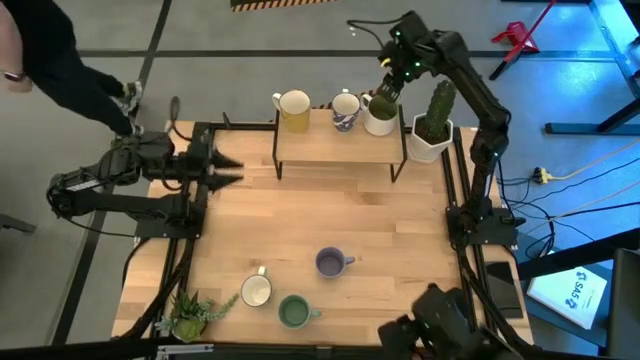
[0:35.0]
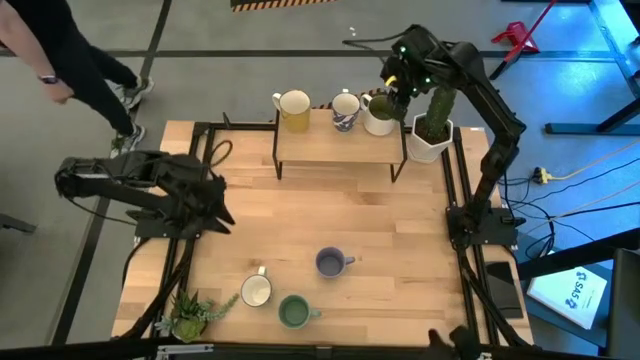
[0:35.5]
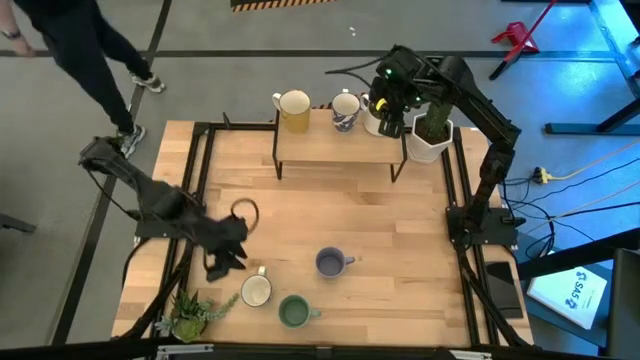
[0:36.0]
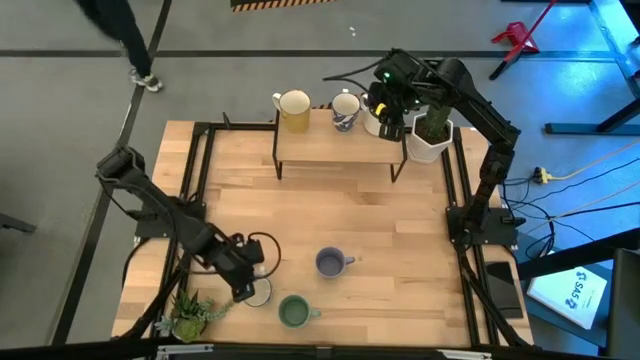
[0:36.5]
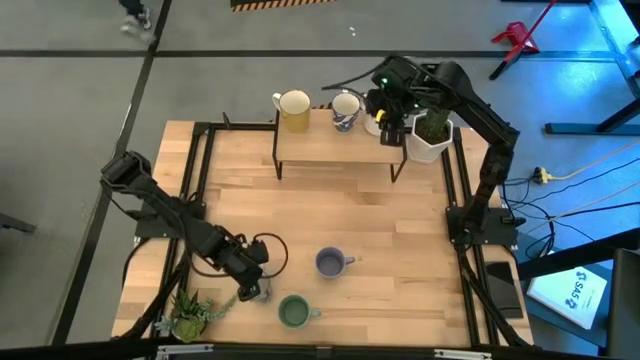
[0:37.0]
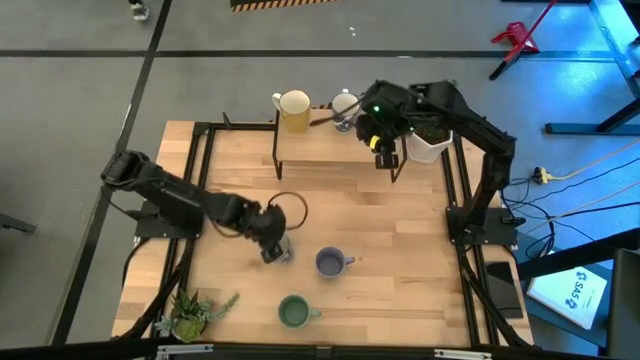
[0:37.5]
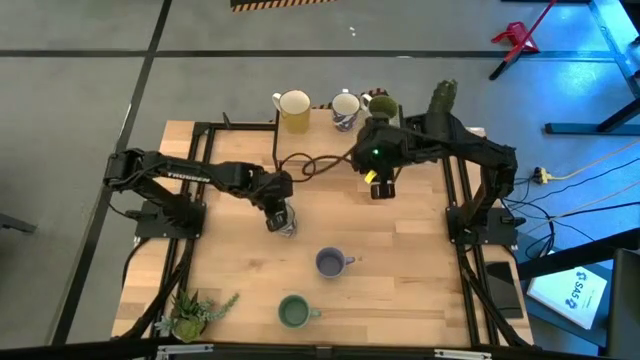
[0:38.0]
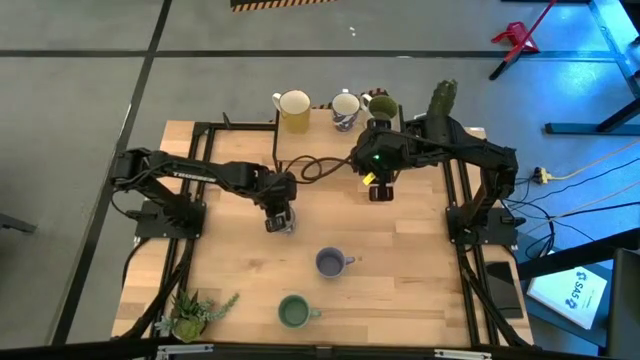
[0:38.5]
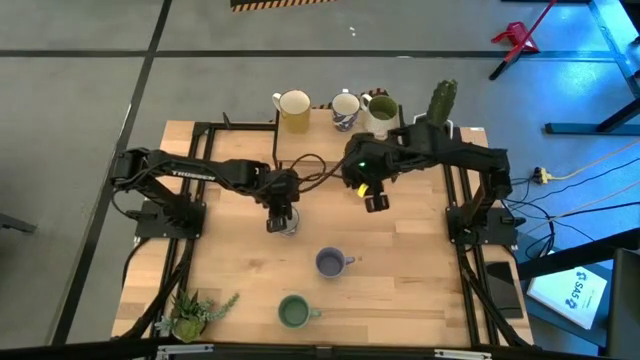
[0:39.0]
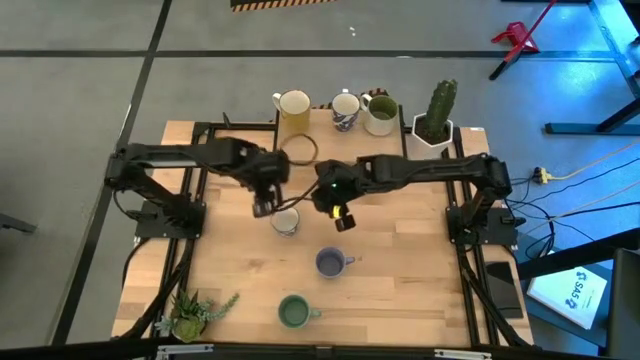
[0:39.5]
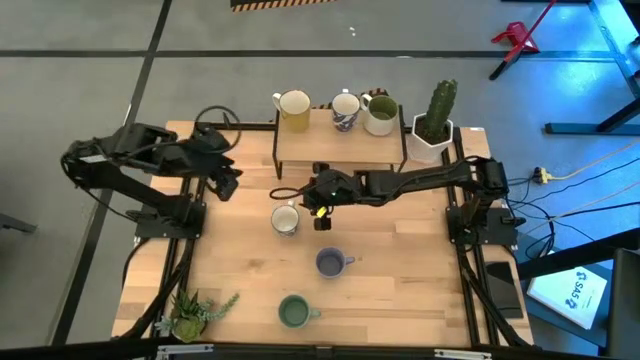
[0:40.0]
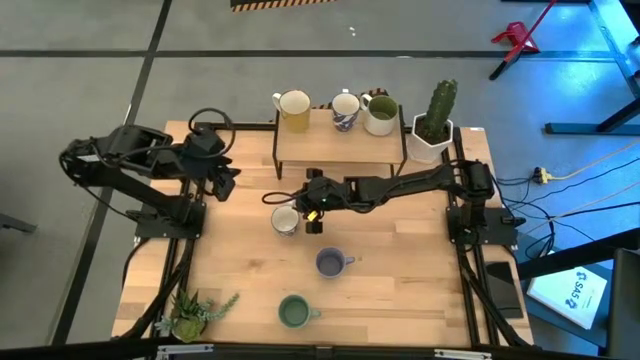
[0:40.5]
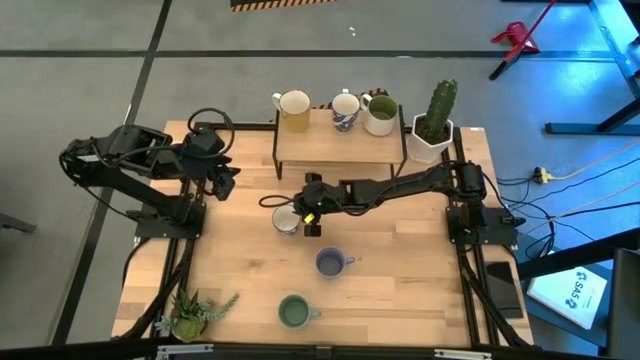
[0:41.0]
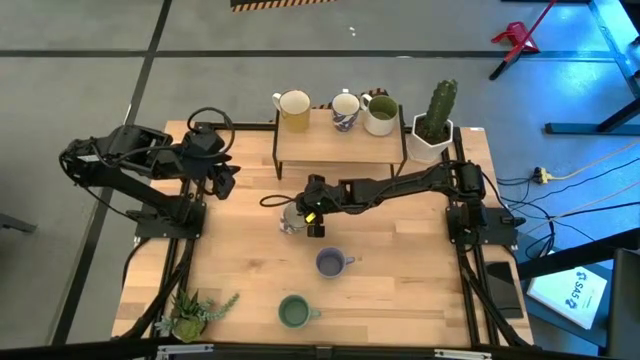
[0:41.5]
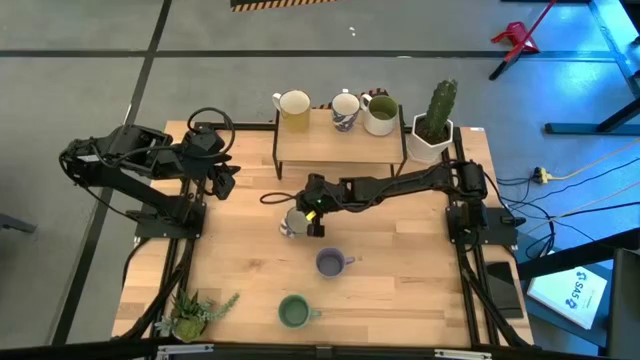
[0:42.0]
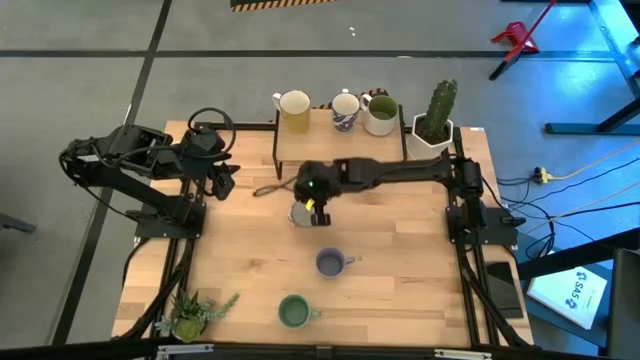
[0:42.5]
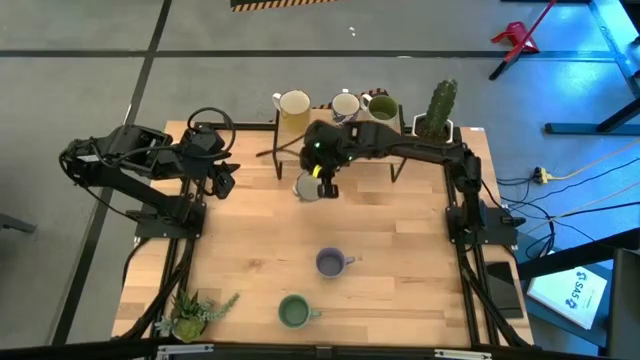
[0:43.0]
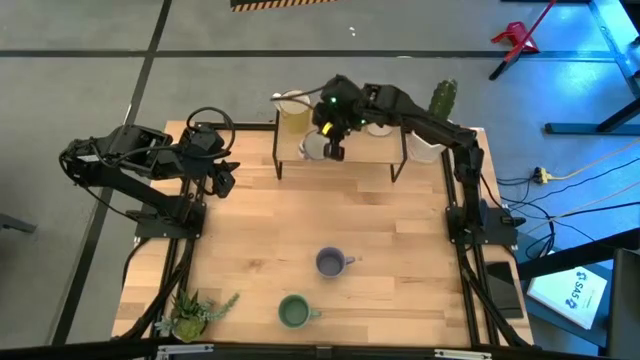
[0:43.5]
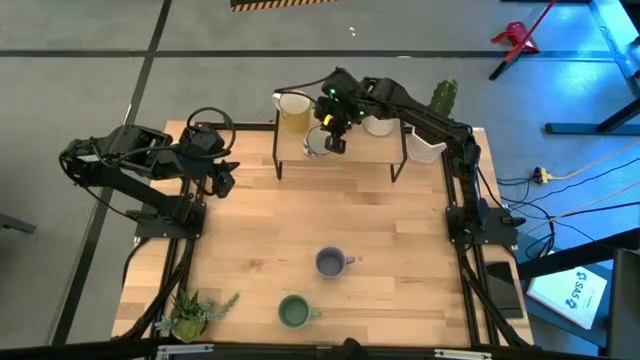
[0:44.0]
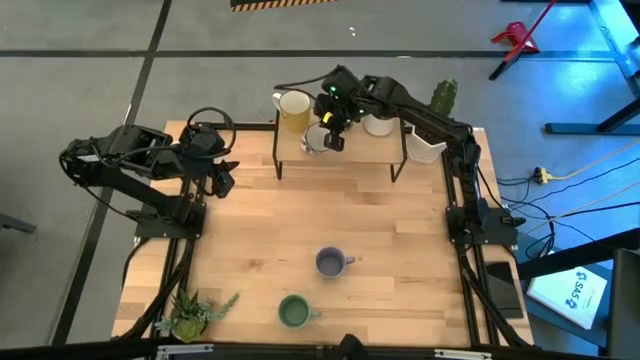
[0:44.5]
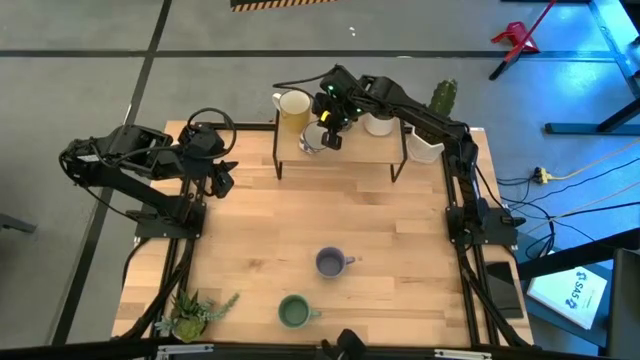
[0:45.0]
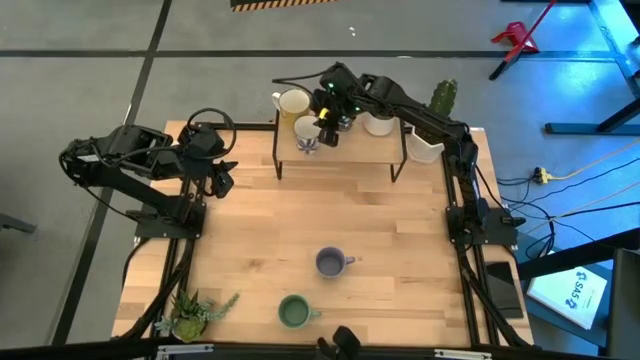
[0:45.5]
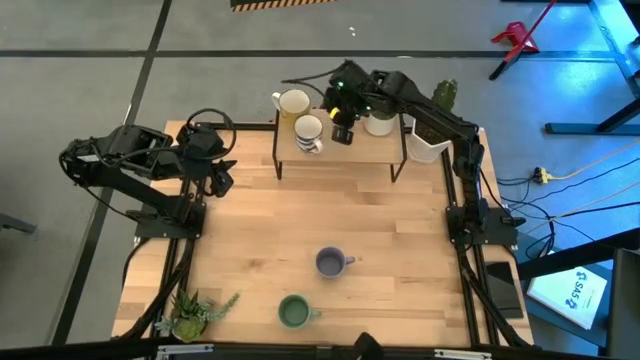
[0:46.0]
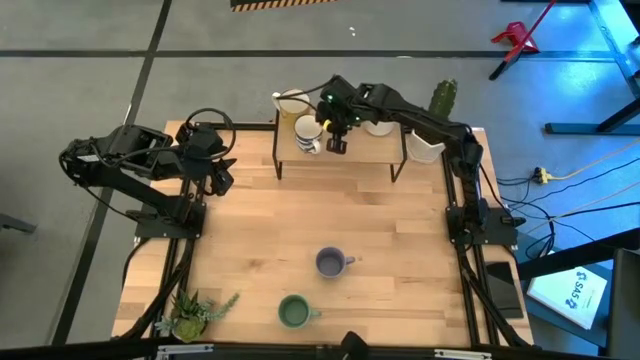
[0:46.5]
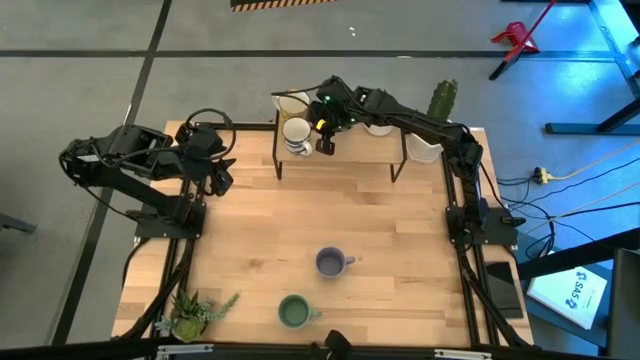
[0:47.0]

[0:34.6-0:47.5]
Task: Place coffee mugs
Put the blue patterned mug on the shelf

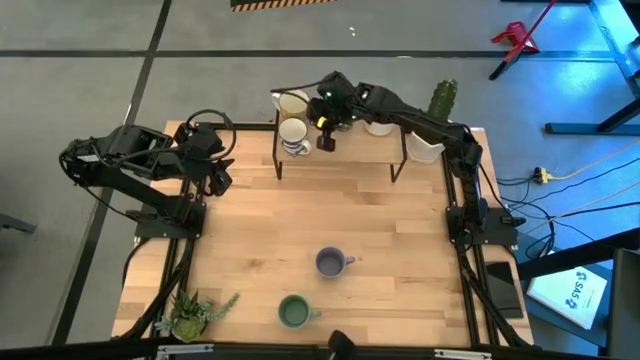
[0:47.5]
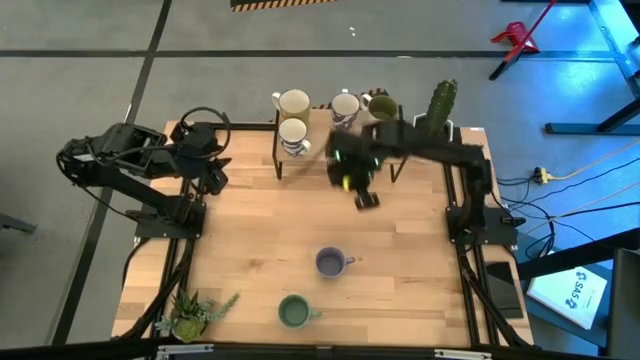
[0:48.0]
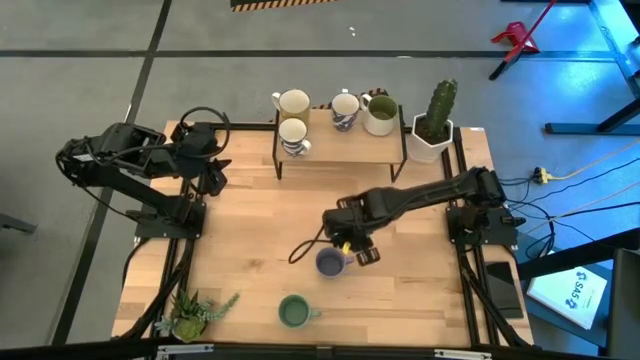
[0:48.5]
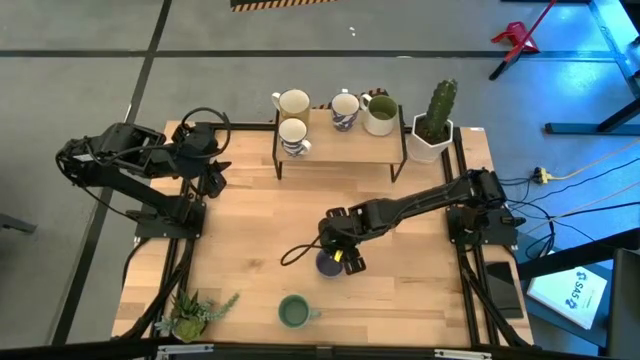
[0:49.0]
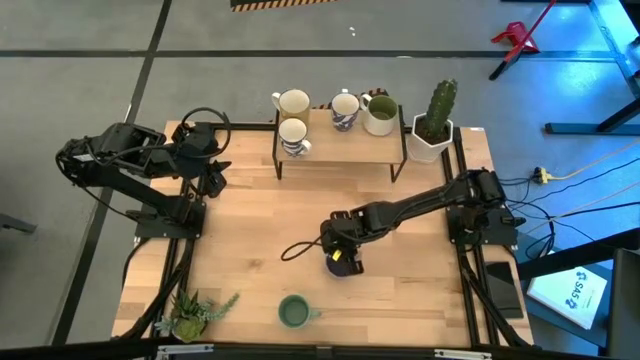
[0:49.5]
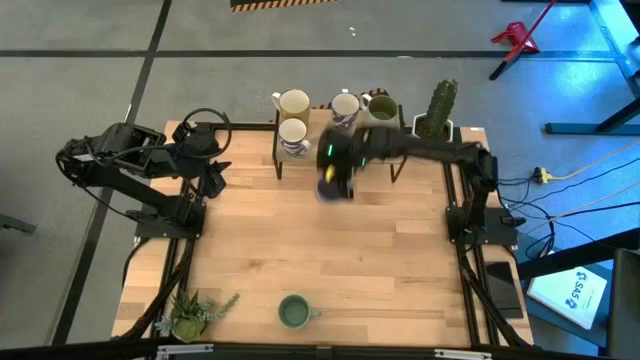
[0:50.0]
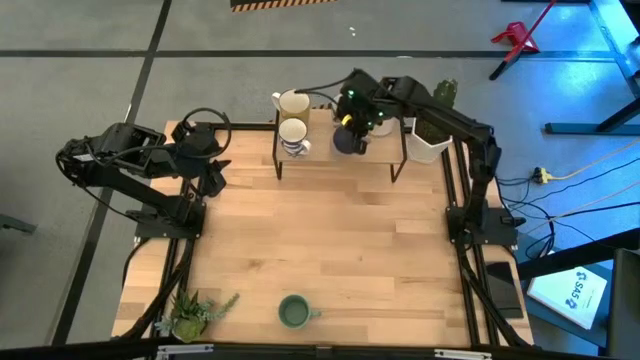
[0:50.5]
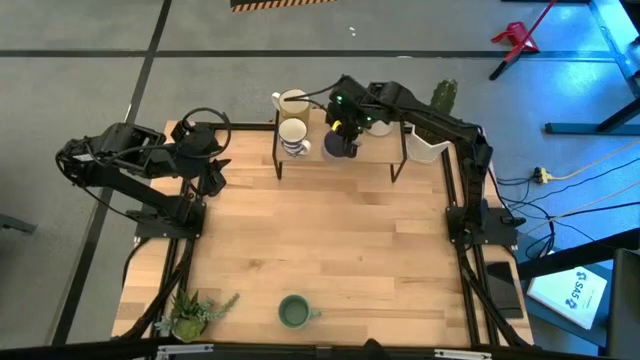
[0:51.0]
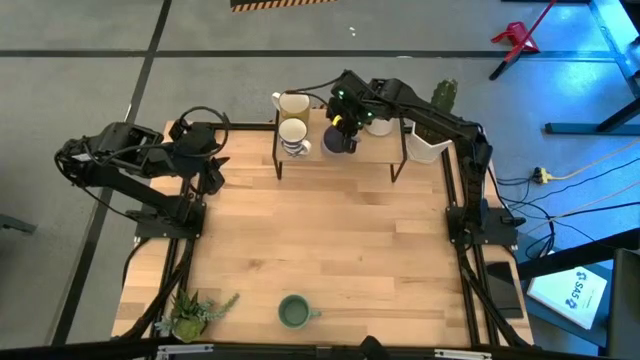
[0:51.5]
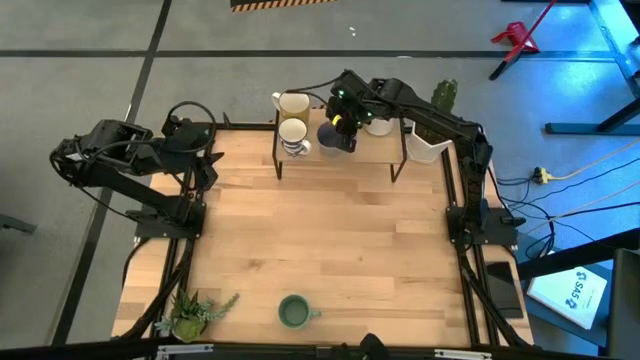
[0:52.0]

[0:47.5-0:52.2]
Put the purple mug on the shelf

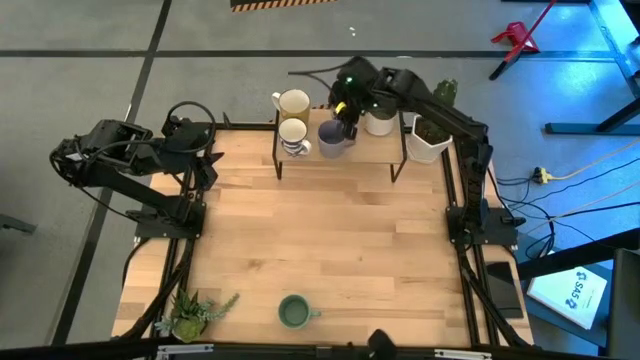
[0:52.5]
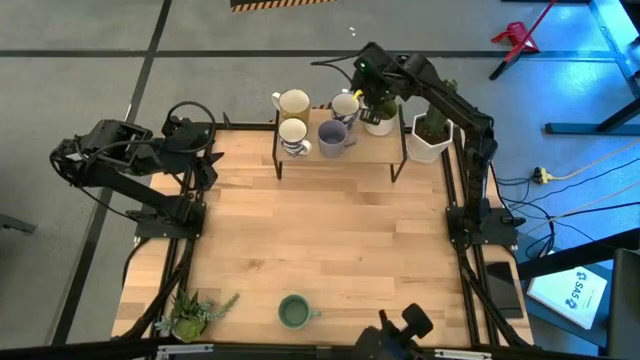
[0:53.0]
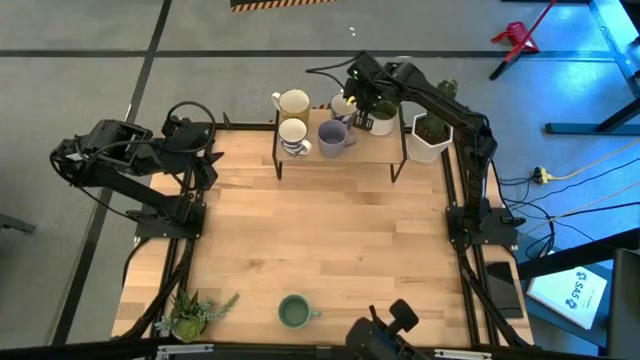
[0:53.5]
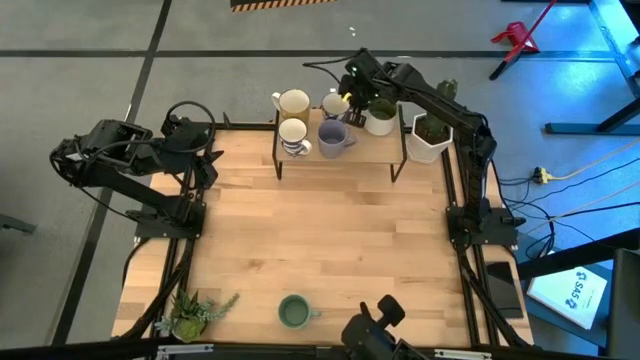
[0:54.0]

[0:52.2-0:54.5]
Adjust the blue patterned mug on the shelf

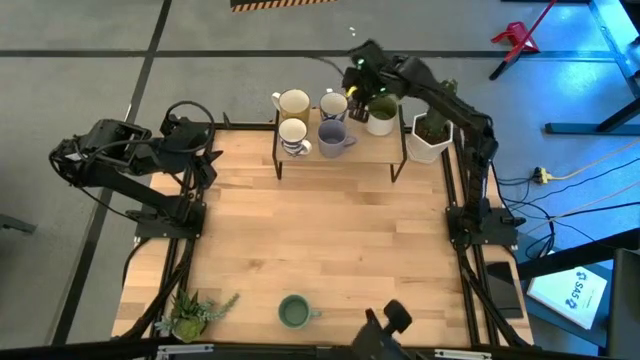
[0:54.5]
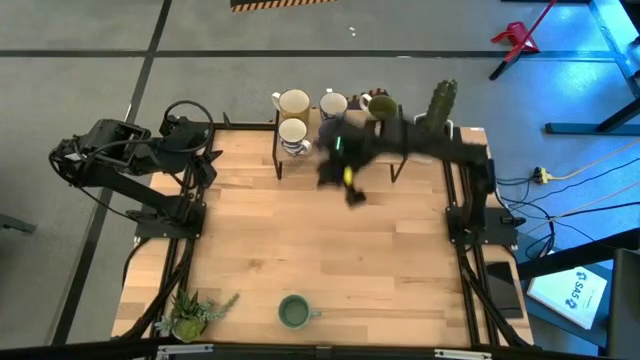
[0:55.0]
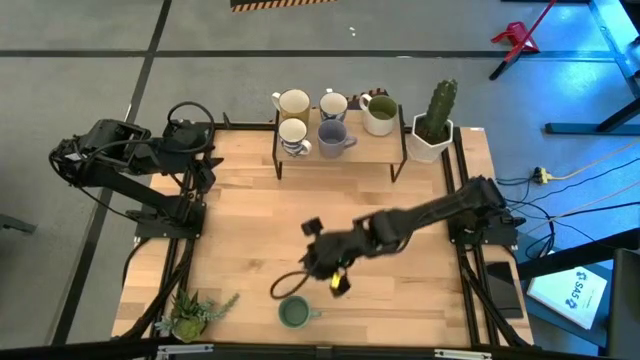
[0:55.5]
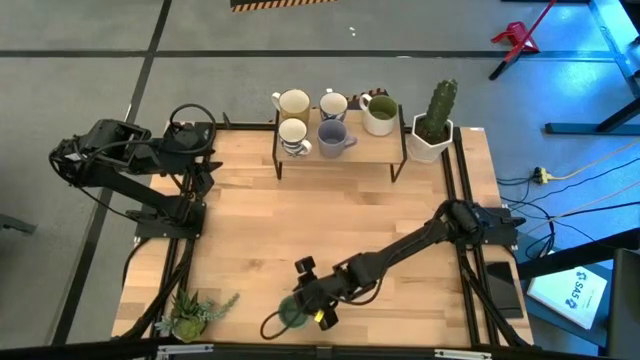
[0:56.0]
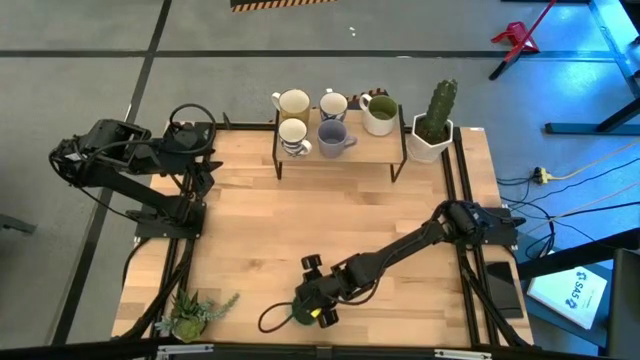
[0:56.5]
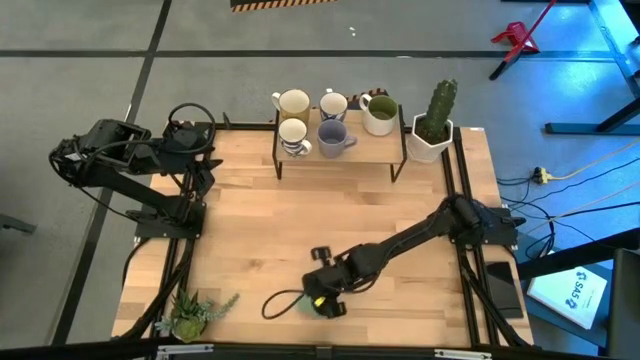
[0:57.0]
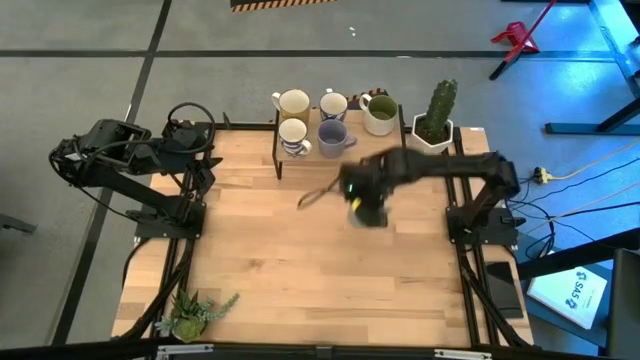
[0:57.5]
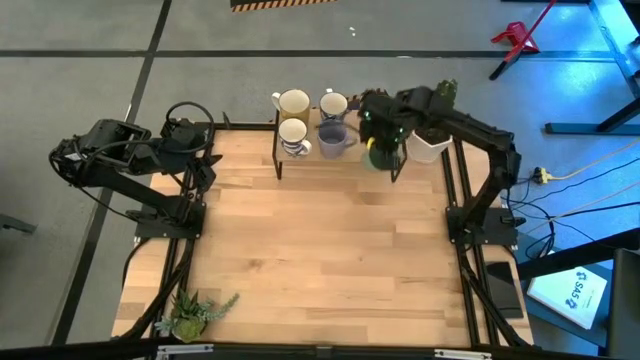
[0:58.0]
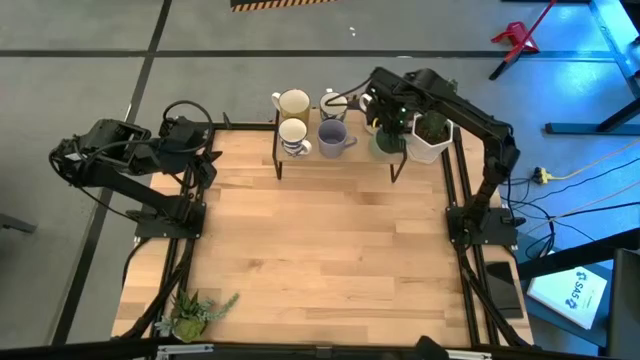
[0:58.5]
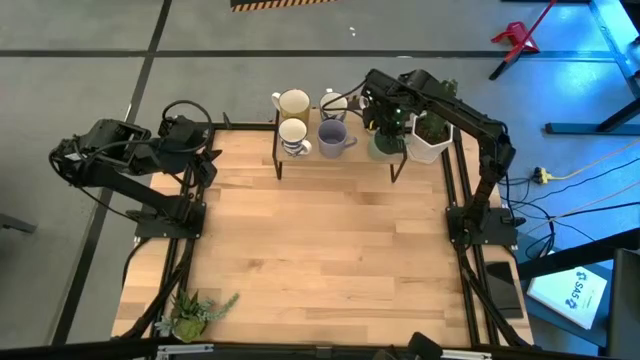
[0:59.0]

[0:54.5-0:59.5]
Put the green mug on the shelf
